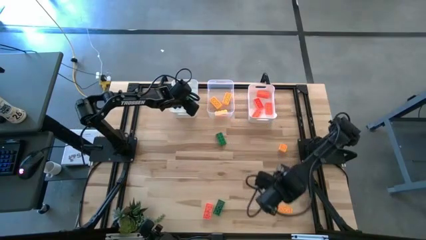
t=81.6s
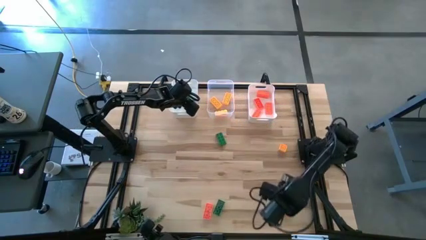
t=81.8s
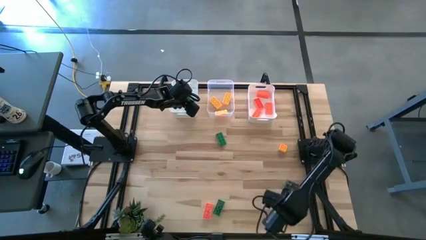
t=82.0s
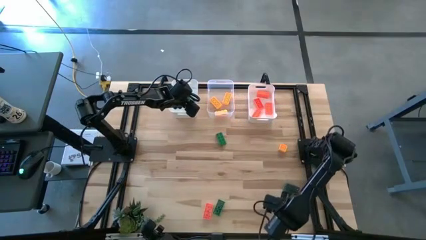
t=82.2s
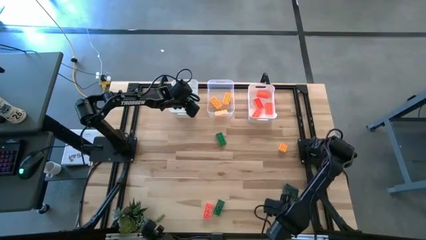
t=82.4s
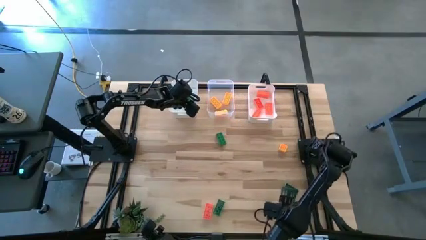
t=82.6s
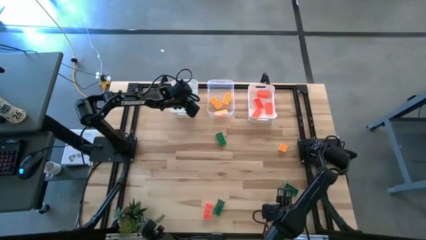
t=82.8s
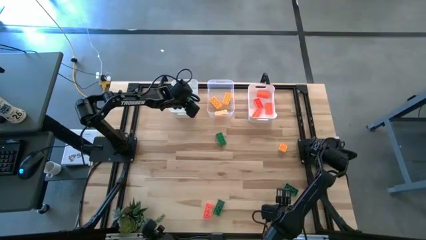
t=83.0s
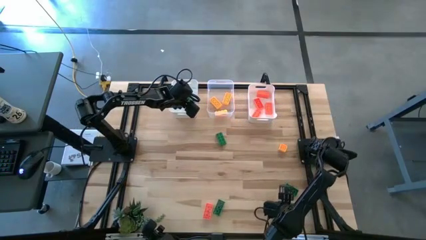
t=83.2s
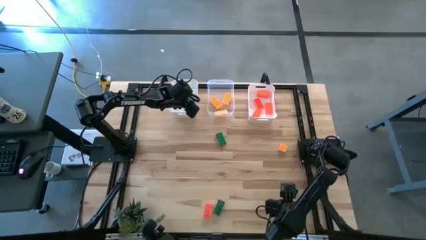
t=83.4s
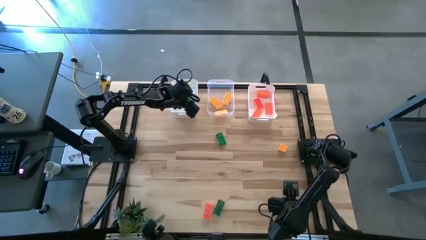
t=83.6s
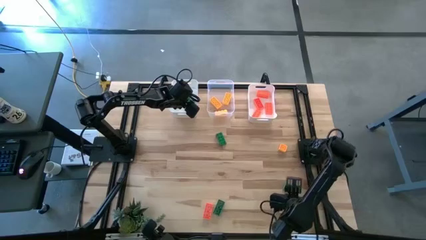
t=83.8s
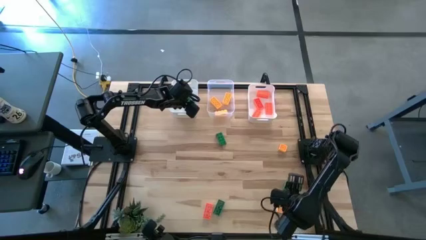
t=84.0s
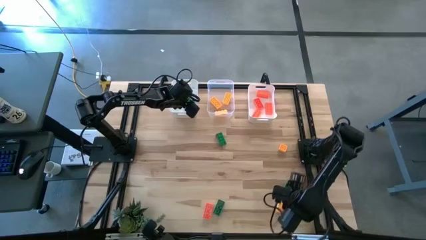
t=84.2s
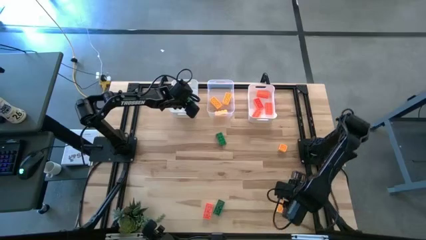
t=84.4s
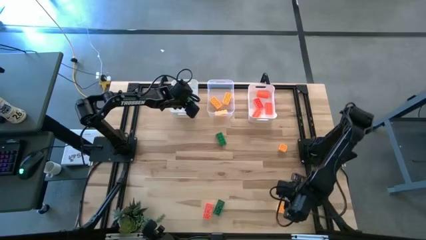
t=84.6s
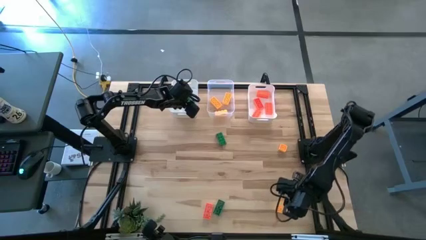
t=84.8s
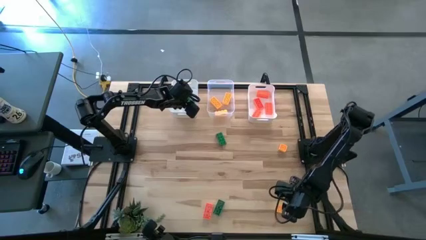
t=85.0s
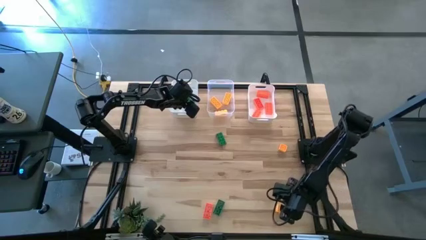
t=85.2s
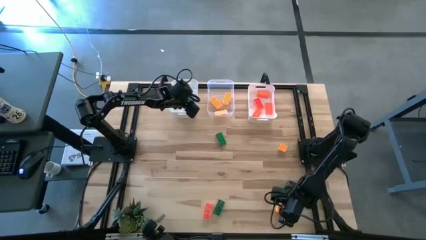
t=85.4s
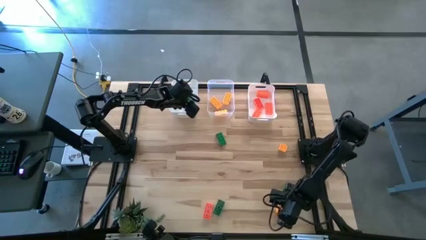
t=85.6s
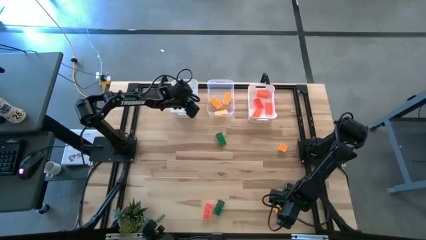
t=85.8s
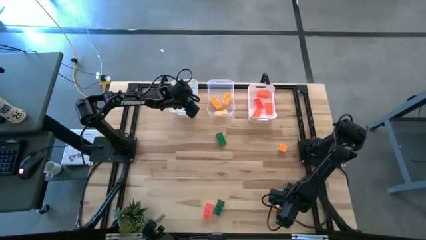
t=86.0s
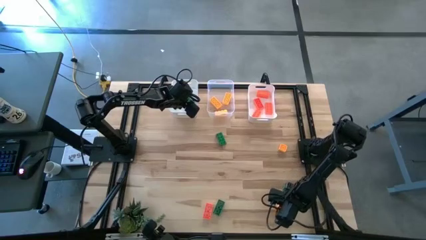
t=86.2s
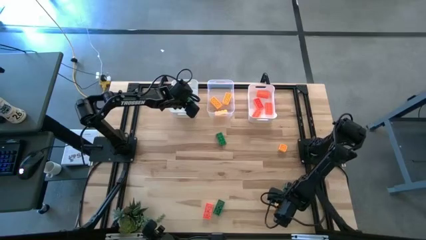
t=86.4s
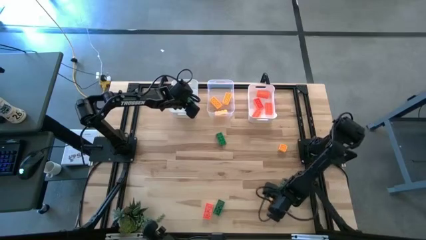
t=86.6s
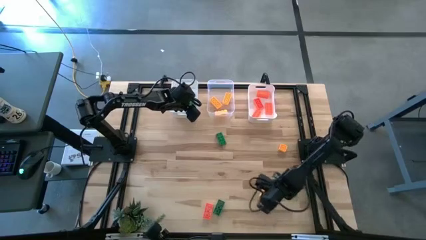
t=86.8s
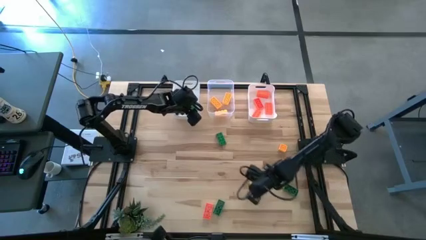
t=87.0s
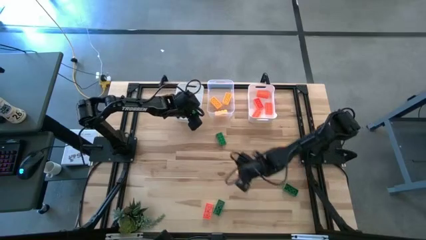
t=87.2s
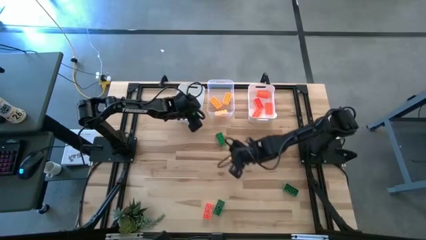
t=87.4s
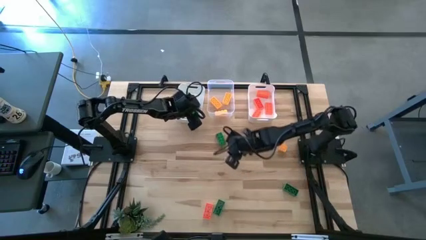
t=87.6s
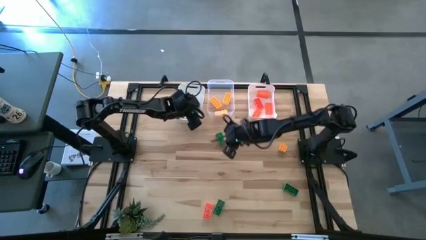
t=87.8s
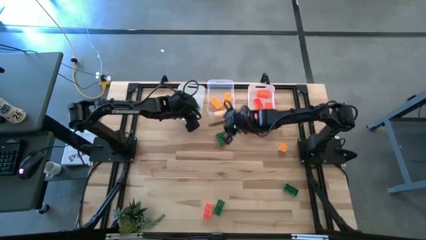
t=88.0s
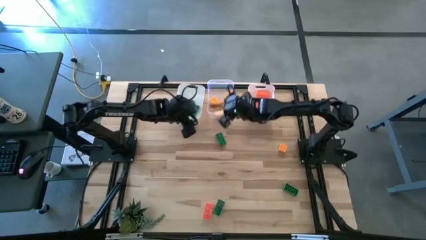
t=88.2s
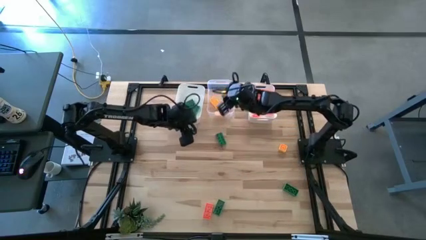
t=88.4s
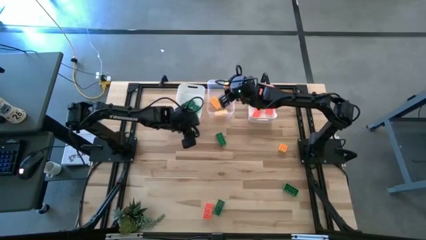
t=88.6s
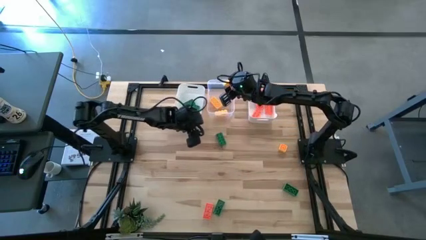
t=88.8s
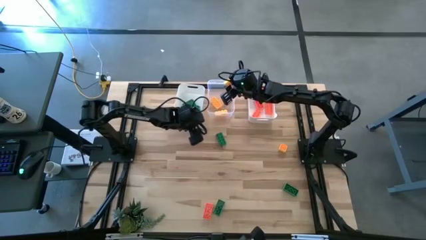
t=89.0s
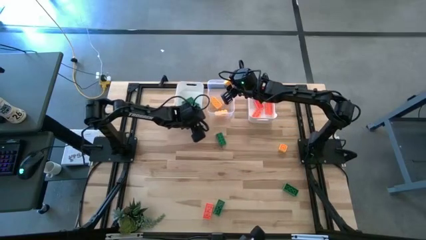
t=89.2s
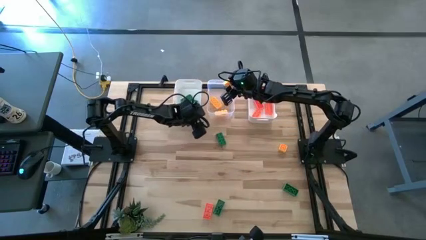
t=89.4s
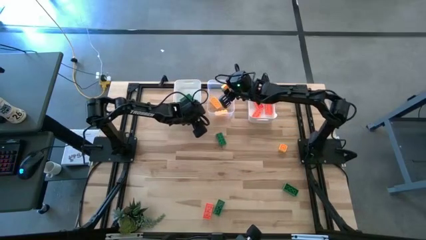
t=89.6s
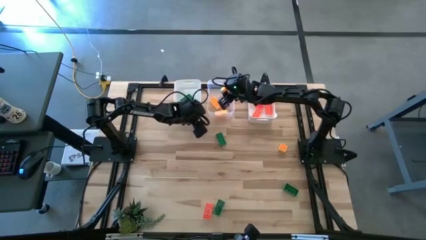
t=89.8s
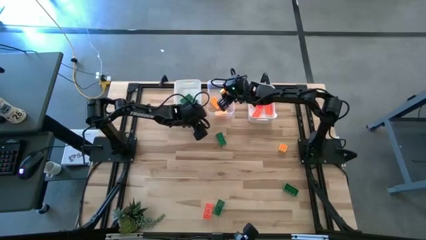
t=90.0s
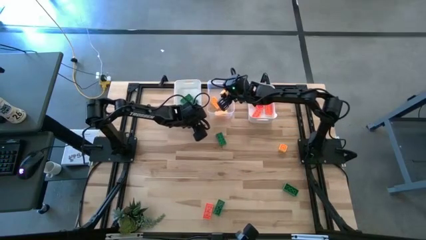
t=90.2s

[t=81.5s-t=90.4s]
Task: Sort & place blocks by color
Put the yellow game piece into the transparent bin

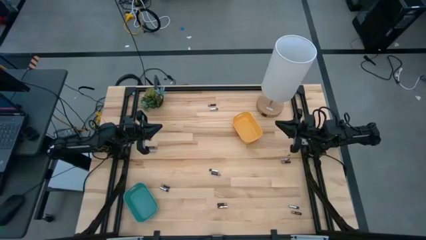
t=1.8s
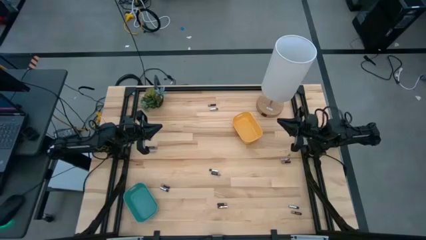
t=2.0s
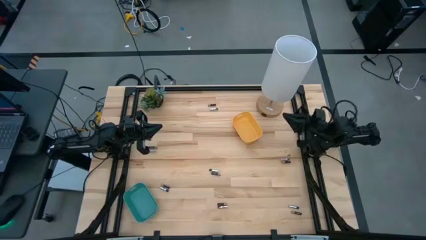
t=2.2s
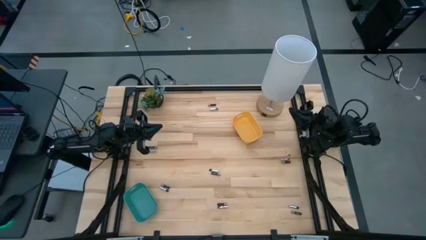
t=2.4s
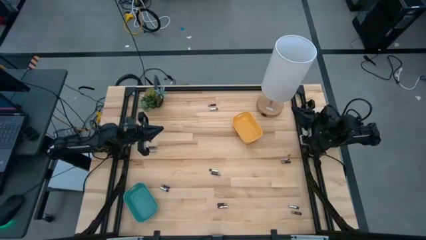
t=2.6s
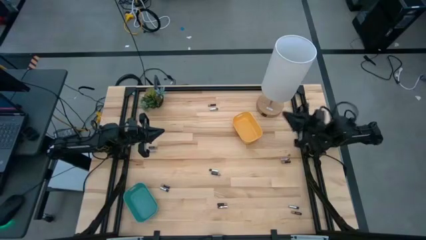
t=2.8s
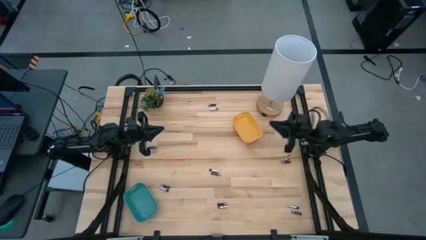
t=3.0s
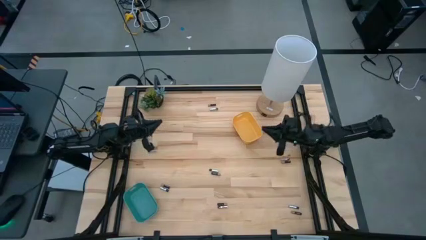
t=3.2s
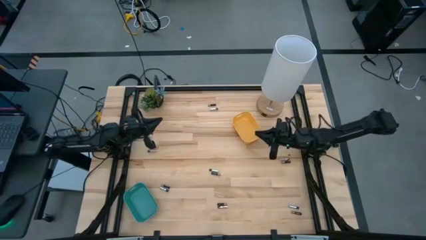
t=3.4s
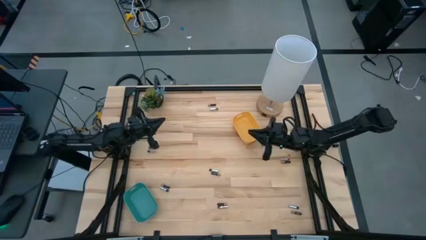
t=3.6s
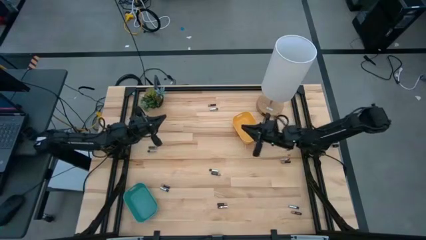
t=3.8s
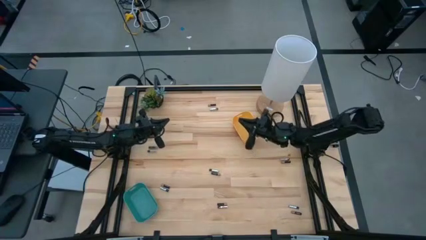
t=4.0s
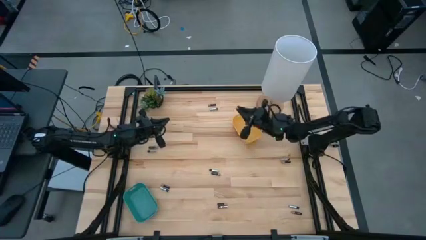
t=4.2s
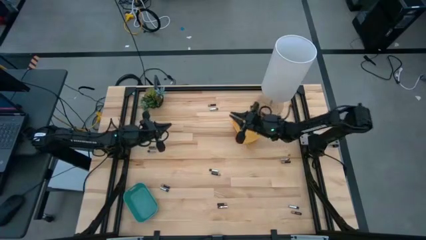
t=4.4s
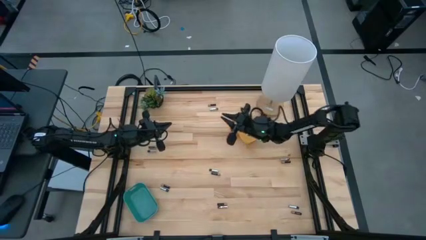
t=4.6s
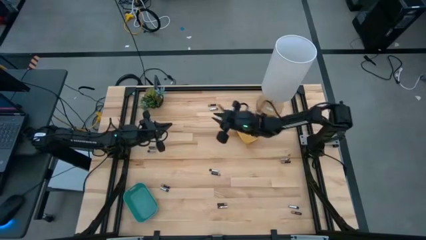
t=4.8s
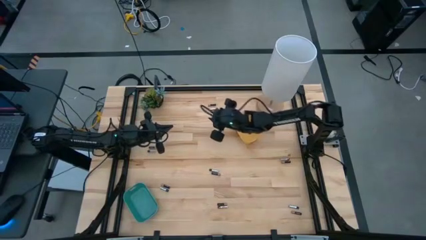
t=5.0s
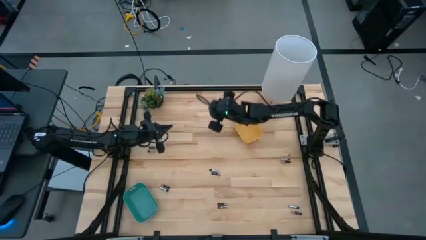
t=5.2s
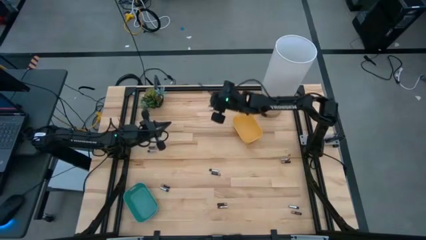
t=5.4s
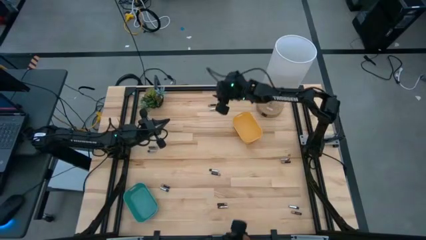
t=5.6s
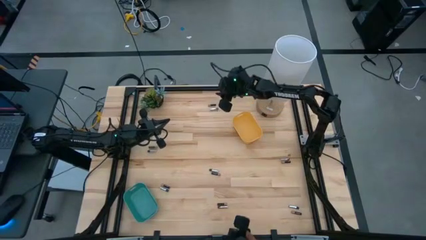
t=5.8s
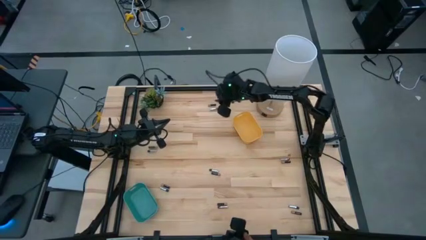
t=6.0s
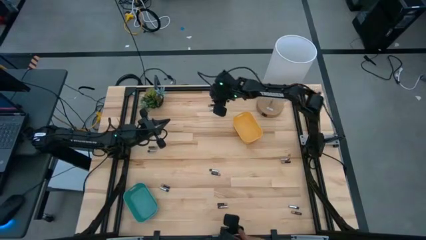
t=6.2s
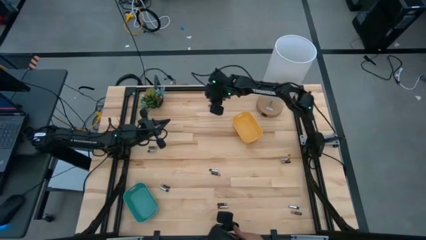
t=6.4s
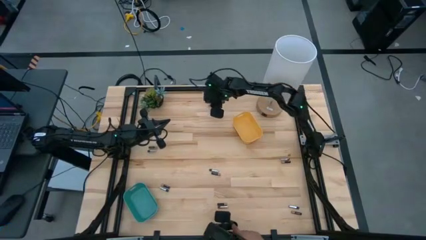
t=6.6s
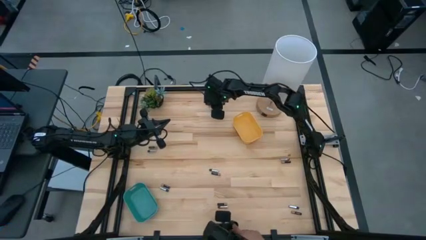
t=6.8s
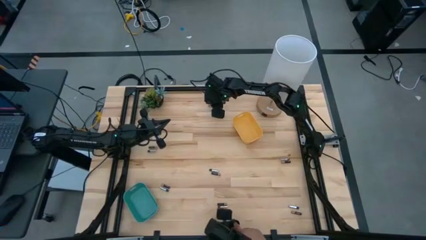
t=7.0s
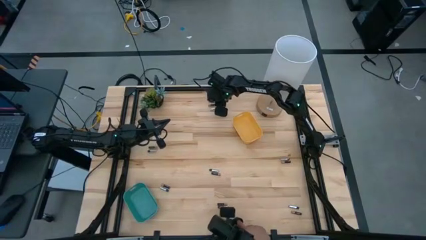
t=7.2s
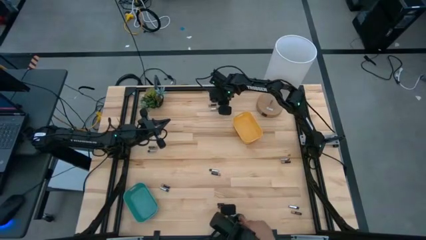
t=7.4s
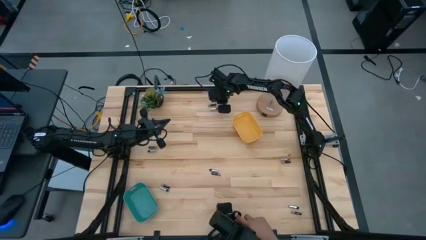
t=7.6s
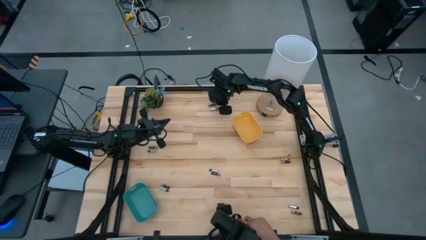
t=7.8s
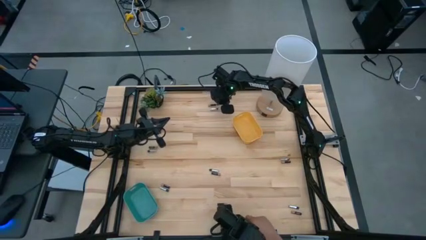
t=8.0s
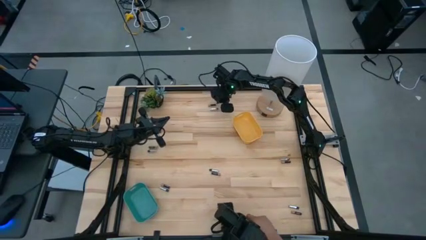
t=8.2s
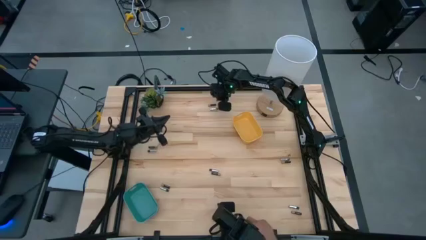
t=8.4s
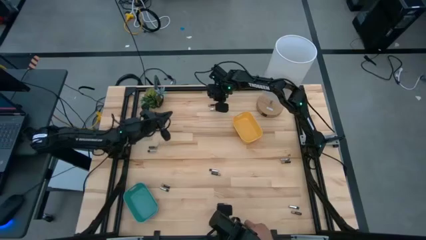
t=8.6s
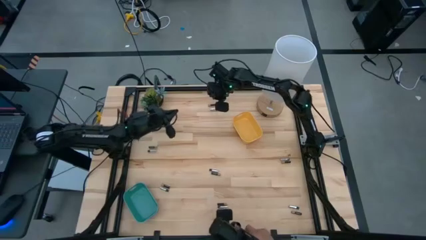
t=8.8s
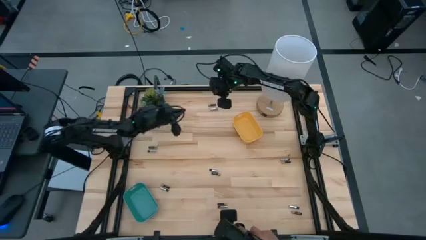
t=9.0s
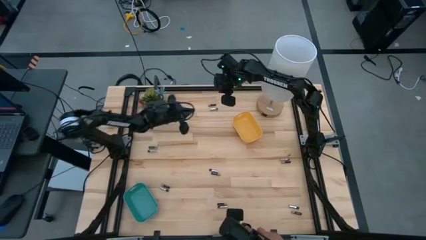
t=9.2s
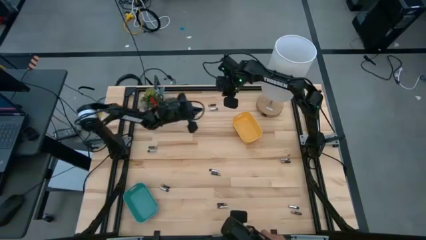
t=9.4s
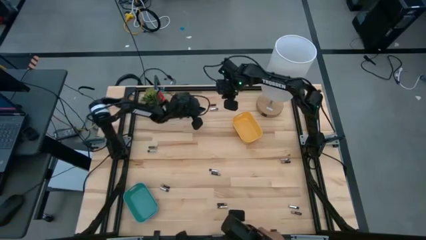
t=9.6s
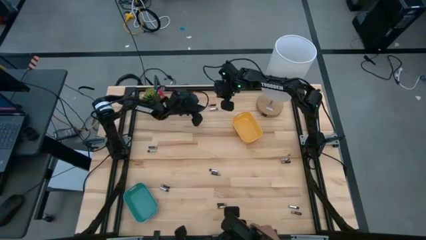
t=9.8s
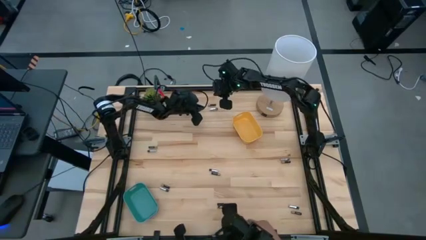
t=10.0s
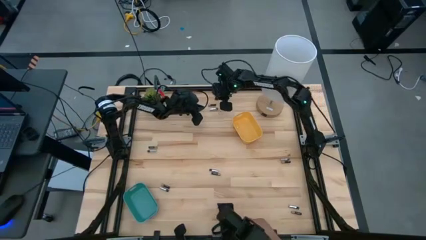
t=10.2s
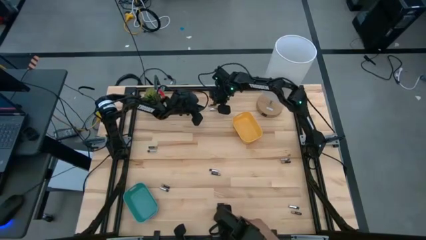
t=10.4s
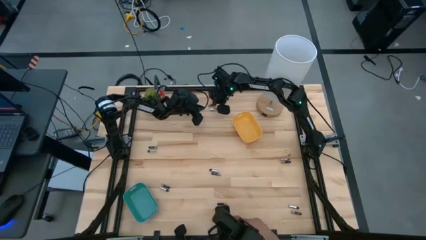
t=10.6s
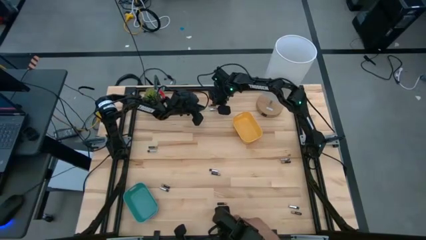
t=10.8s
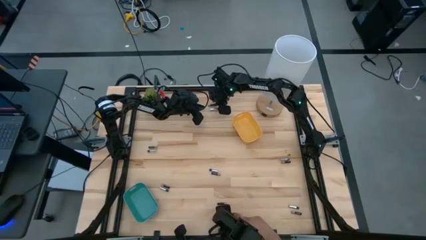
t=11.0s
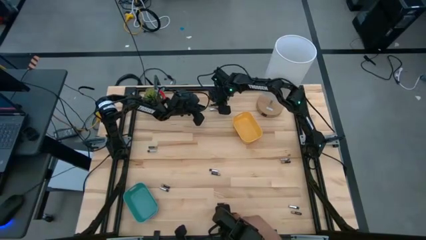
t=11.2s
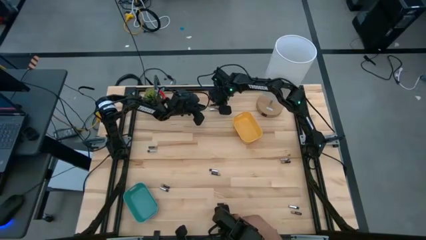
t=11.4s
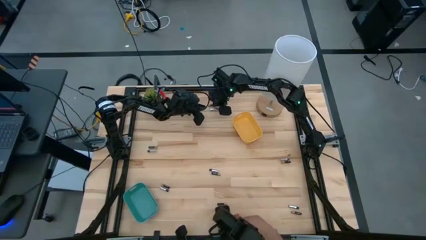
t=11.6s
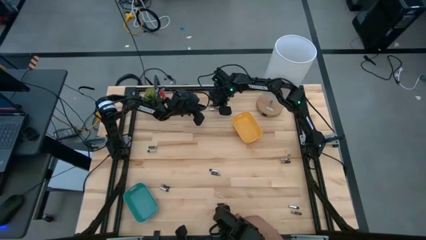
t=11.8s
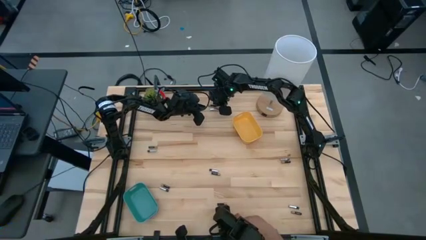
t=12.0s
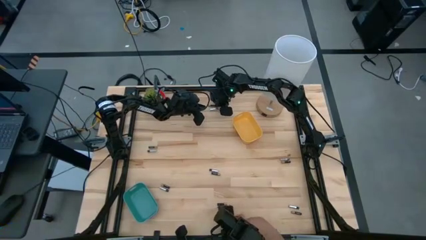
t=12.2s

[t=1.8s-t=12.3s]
Task: Sort batteries
Put the black battery into the yellow bin
